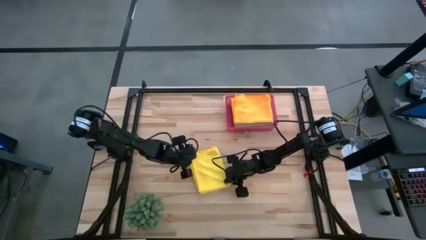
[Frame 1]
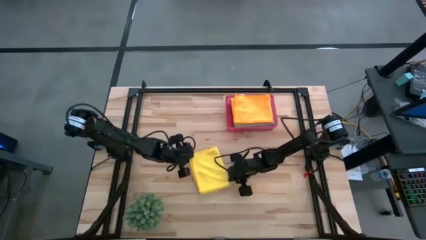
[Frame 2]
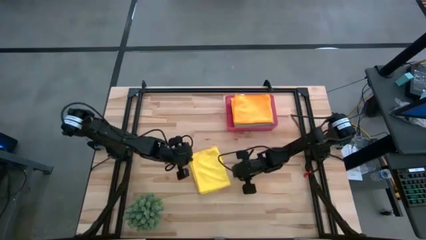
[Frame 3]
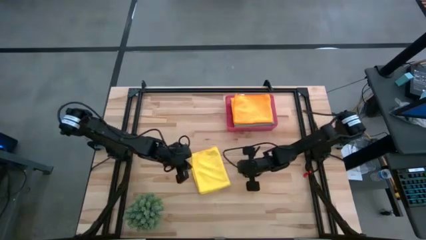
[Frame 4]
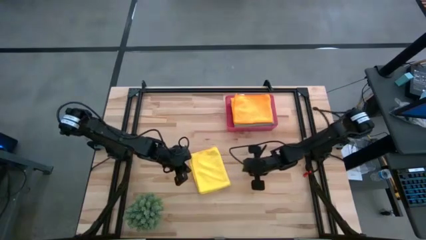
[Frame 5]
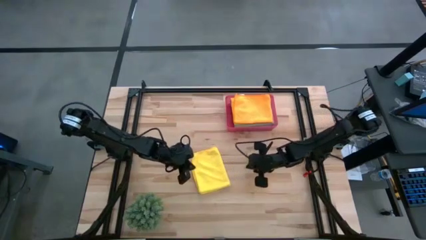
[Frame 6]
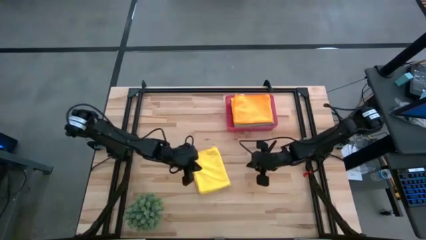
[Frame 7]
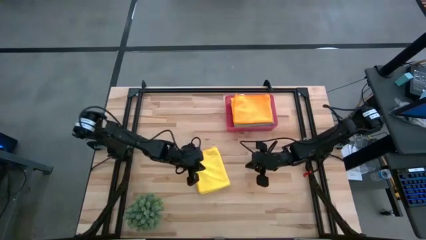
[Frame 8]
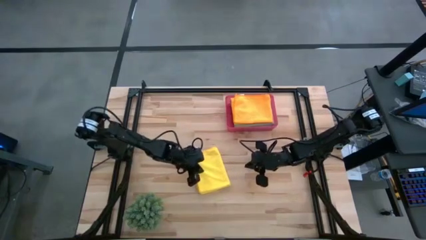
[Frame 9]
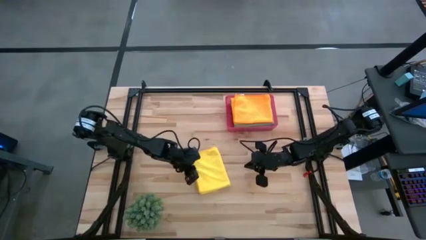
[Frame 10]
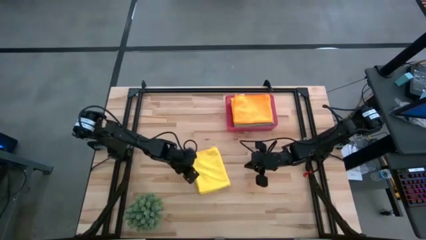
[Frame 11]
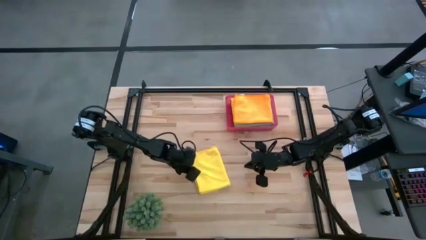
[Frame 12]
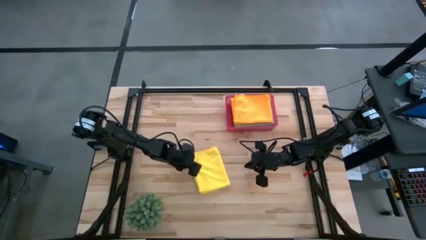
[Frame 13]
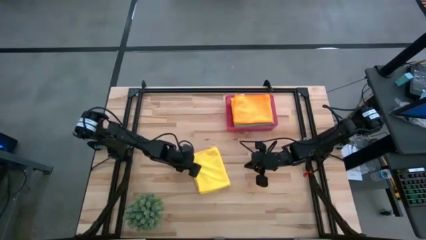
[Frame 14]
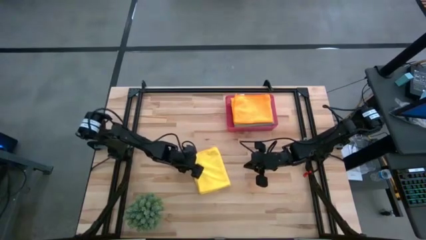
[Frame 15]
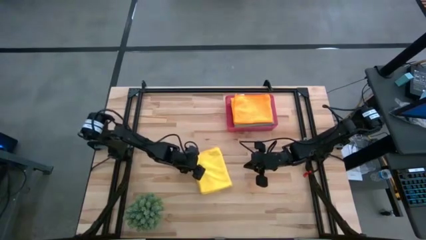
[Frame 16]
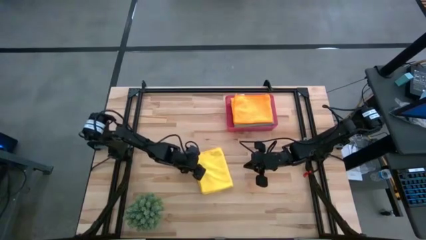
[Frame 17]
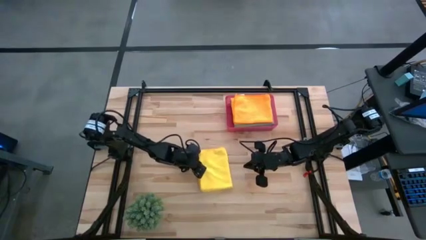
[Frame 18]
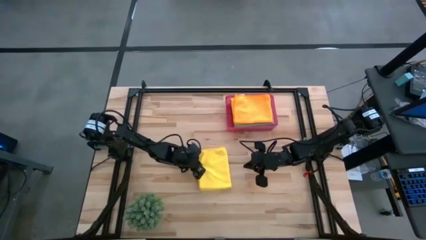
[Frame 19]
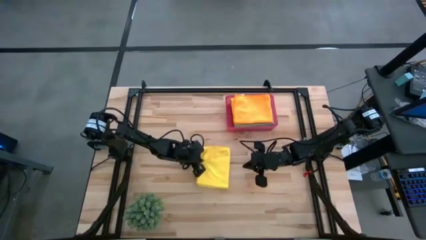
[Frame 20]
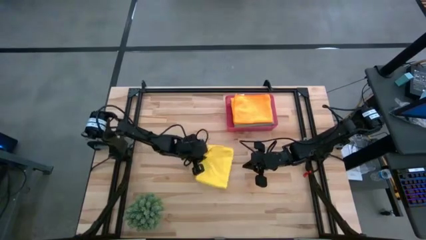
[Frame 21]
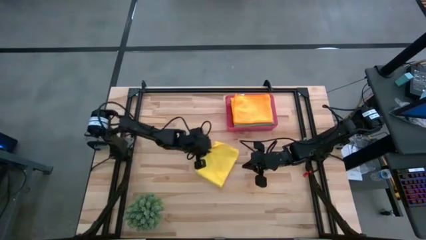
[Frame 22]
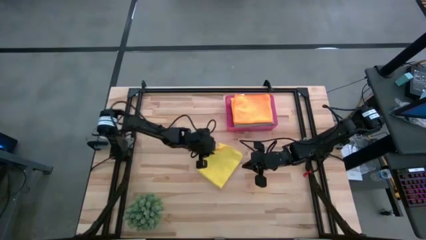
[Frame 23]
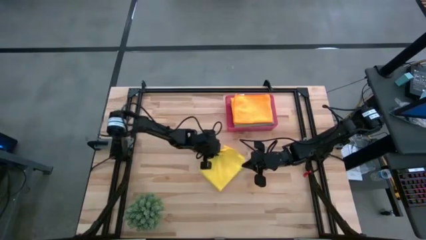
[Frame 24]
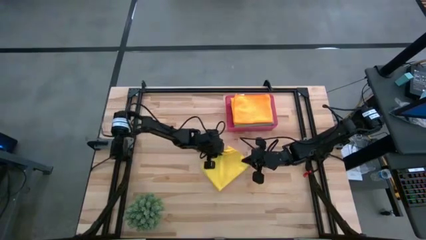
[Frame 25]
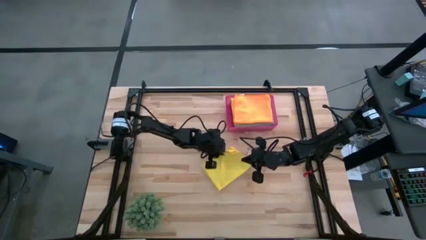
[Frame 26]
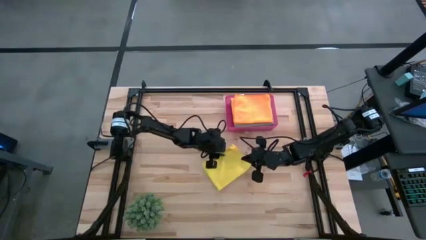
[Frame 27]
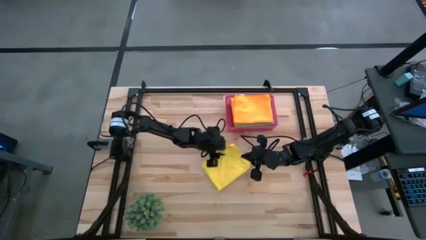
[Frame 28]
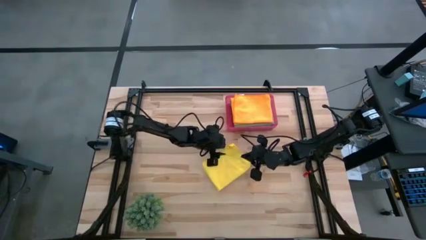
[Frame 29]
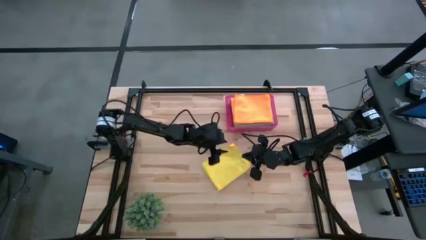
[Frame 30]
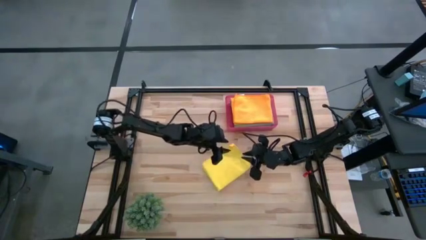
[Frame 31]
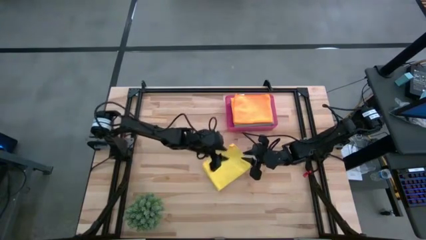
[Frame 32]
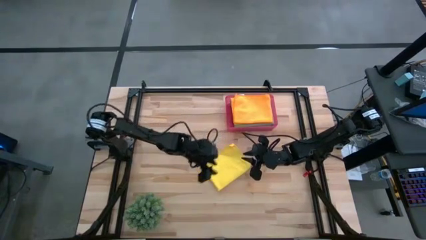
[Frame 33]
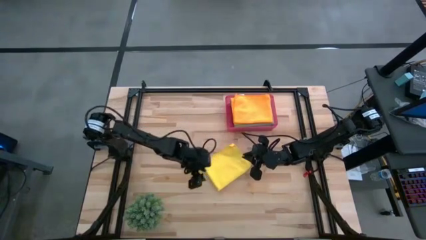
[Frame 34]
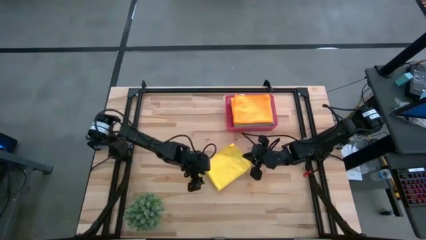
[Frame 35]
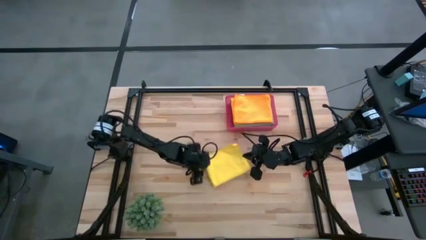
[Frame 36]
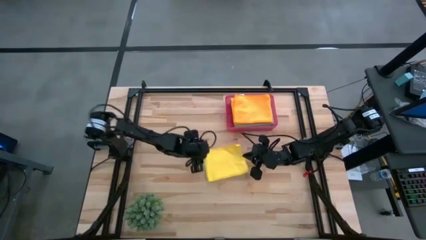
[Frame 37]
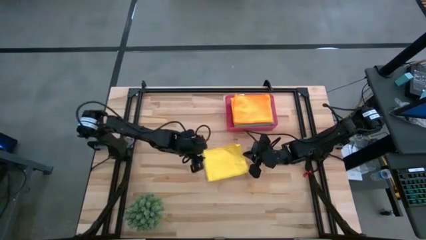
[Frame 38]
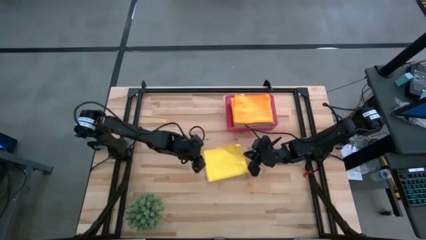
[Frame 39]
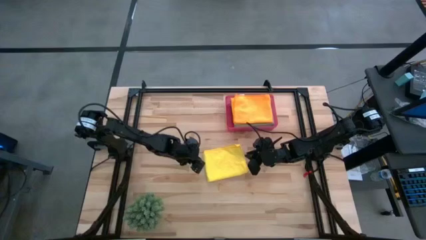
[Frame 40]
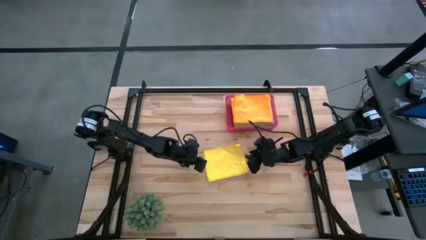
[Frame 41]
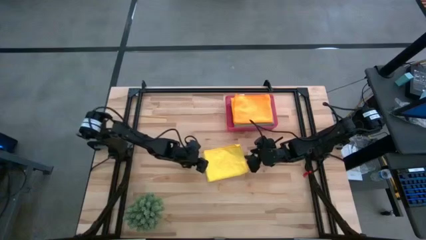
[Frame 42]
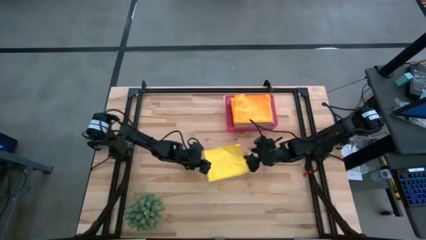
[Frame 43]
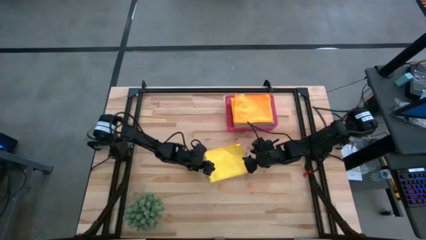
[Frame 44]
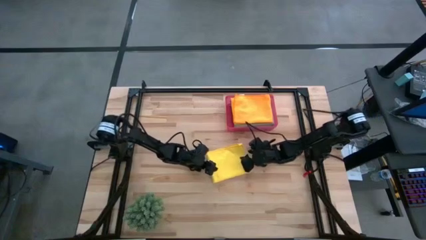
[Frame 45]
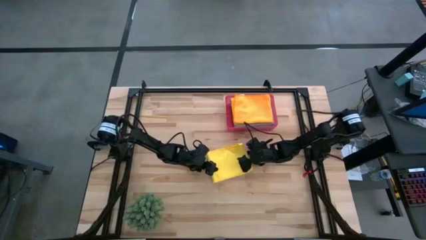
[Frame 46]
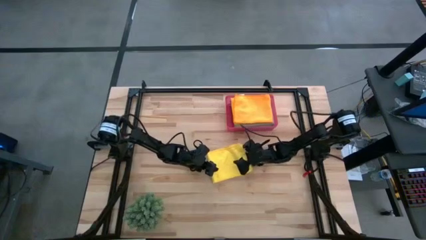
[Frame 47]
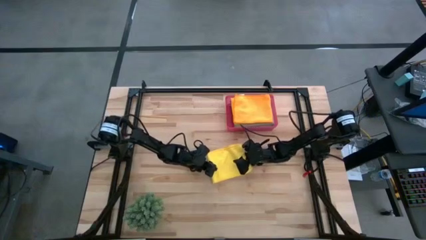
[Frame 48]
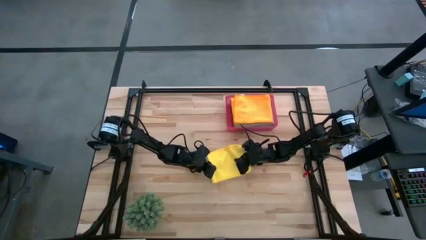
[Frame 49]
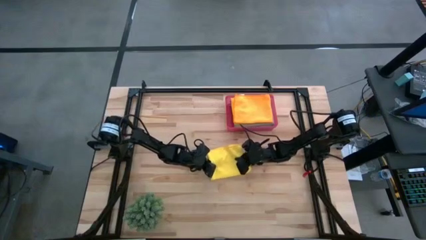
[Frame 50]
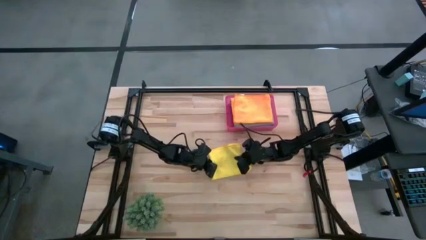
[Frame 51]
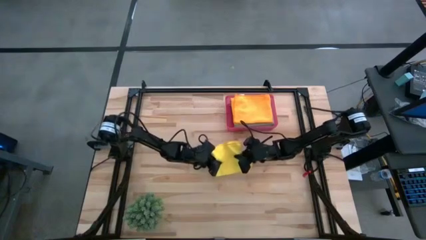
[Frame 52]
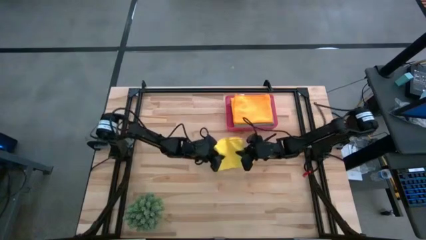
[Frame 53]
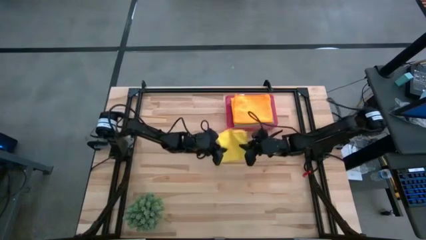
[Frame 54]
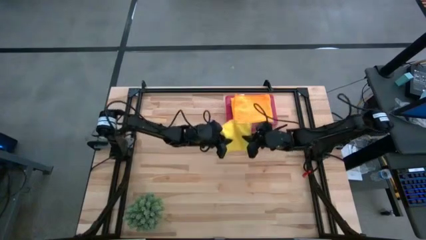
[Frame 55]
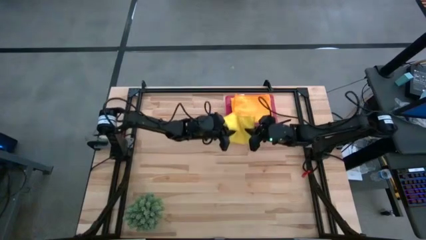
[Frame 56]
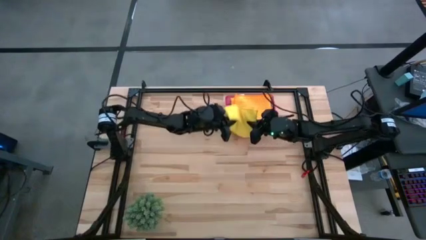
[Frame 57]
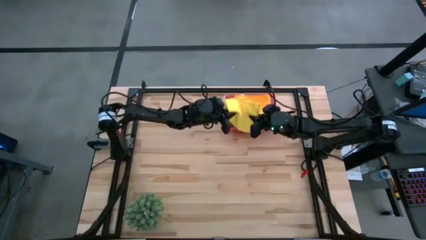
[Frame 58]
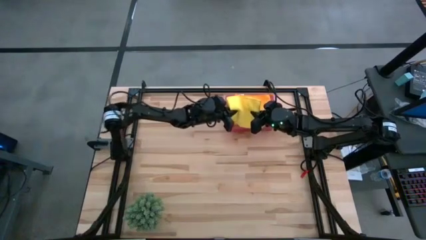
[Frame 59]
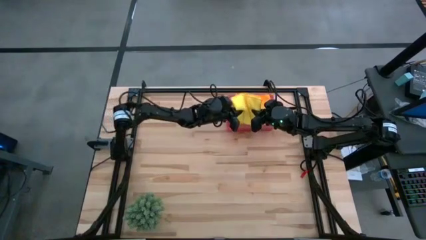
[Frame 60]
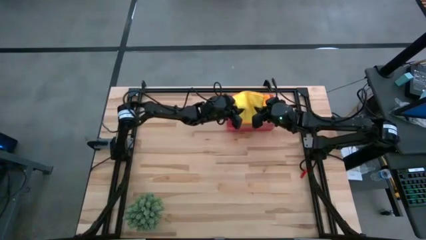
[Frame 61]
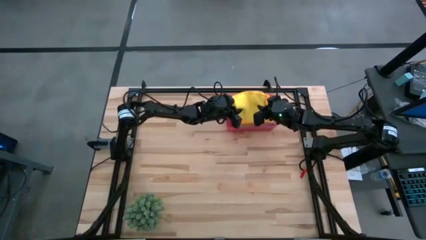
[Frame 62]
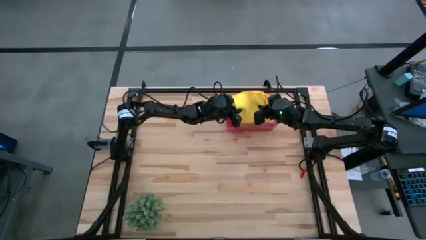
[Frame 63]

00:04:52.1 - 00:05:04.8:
Task: Fold microfiber towels
Put the folded yellow microfiber cloth into the red bin
